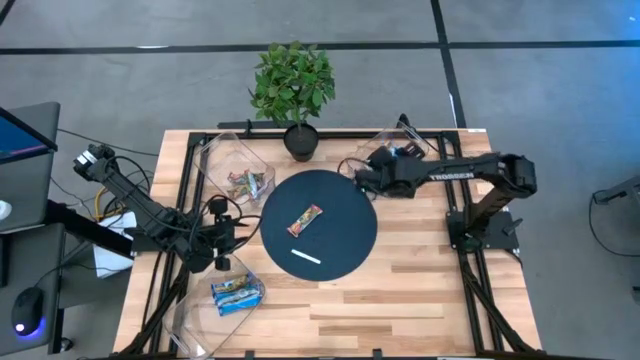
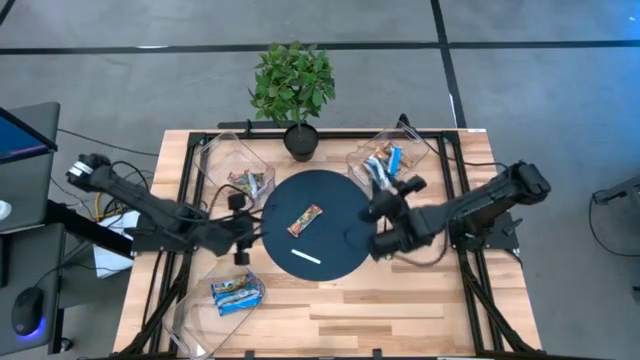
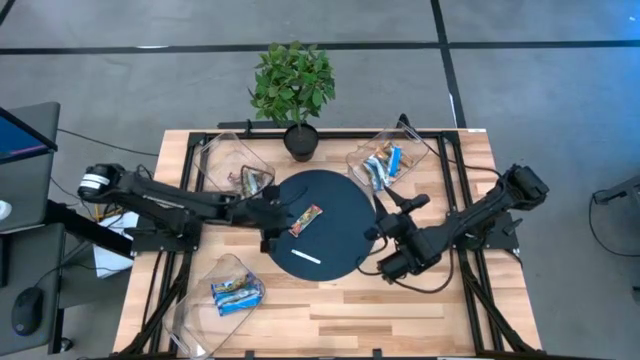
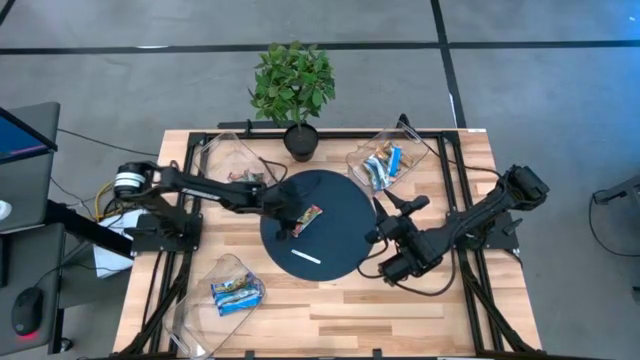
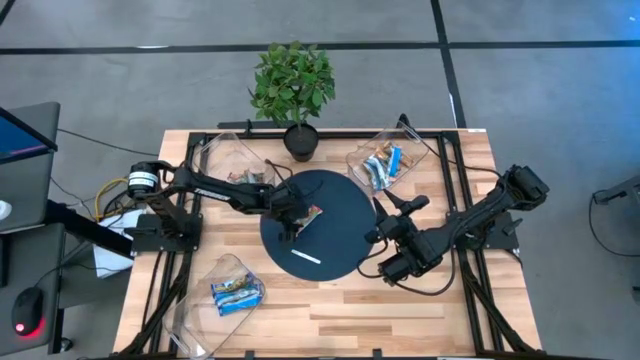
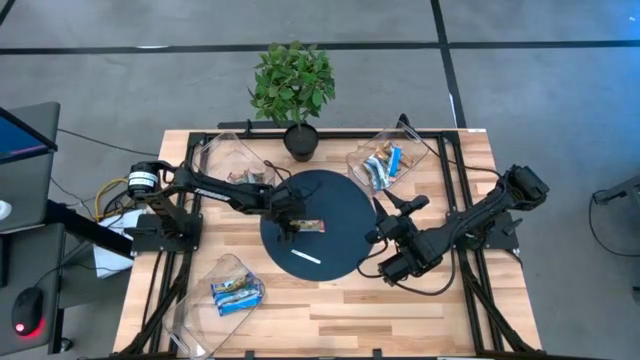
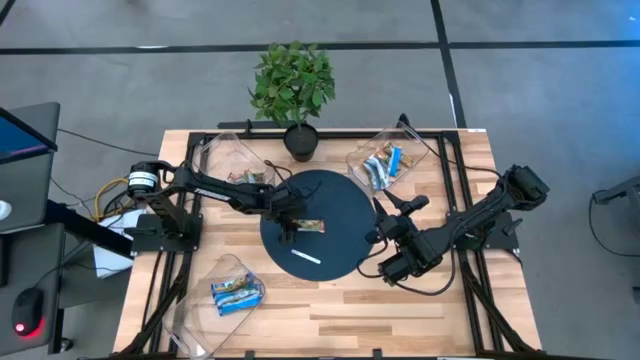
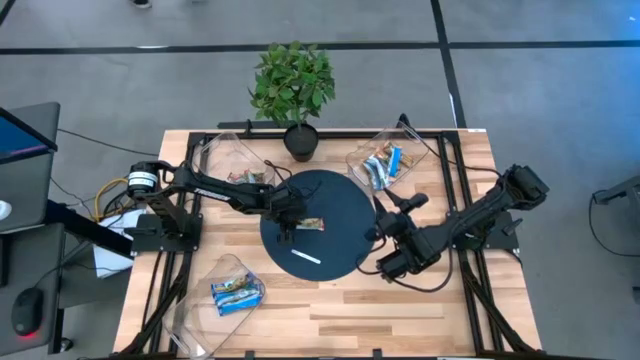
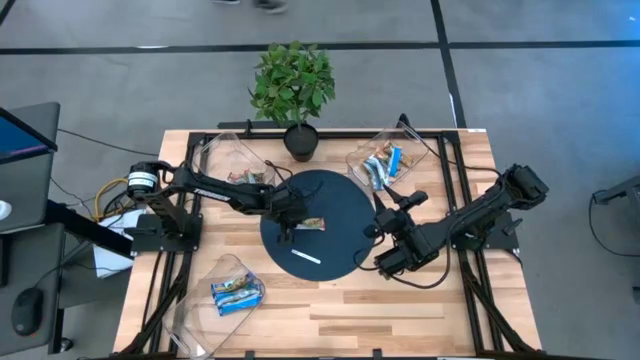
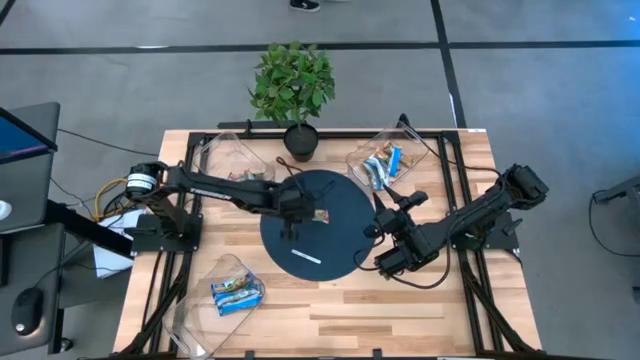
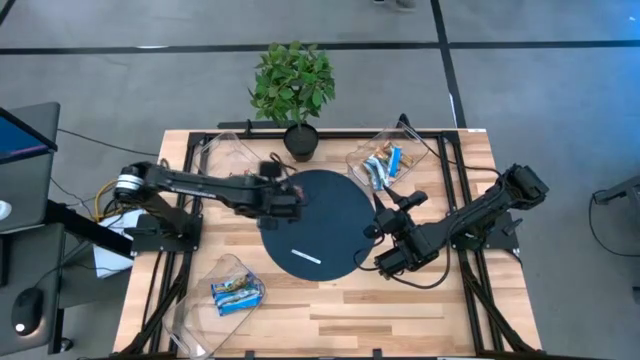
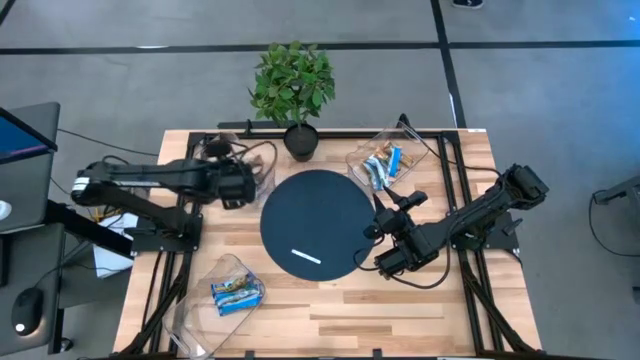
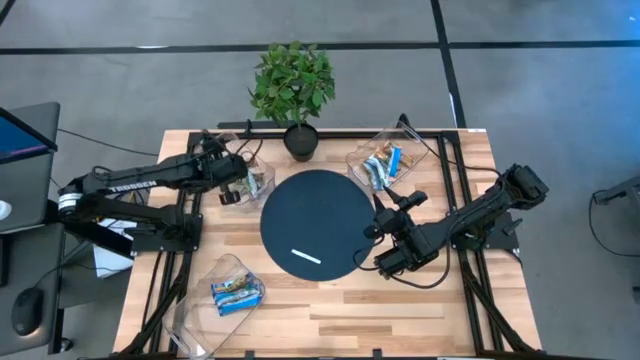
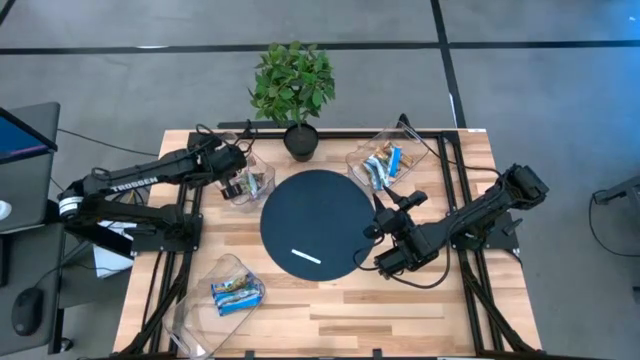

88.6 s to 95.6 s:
Task: Pick and place Granola Bars by type
Put the red granola bar into the top left bin

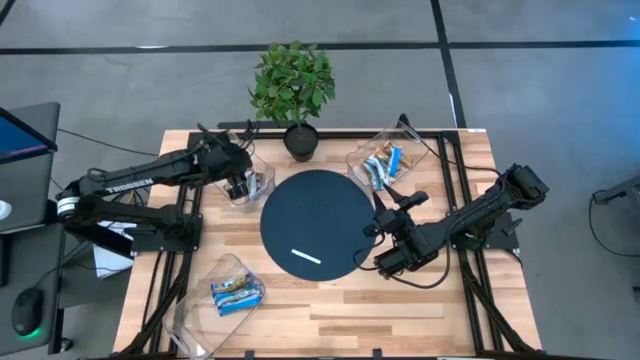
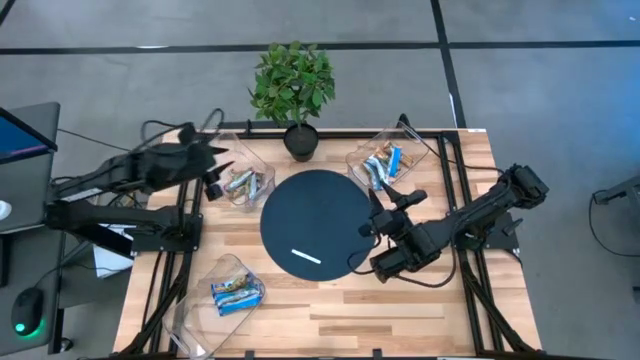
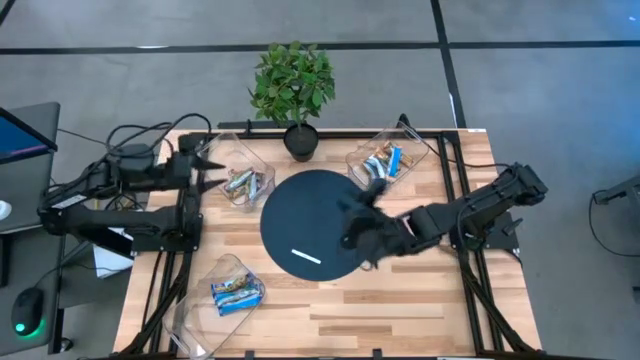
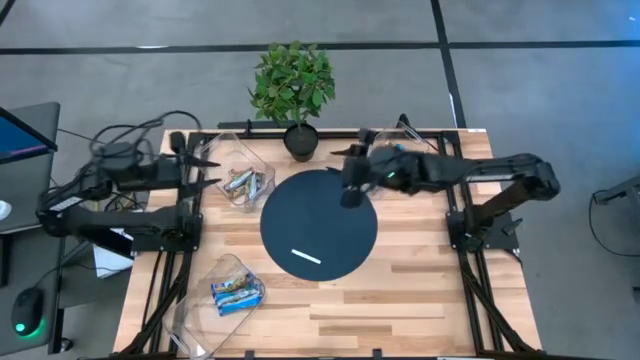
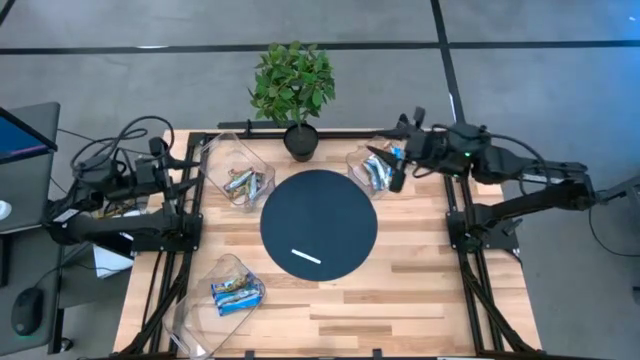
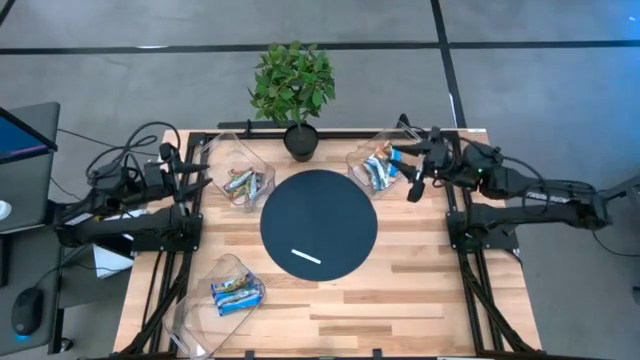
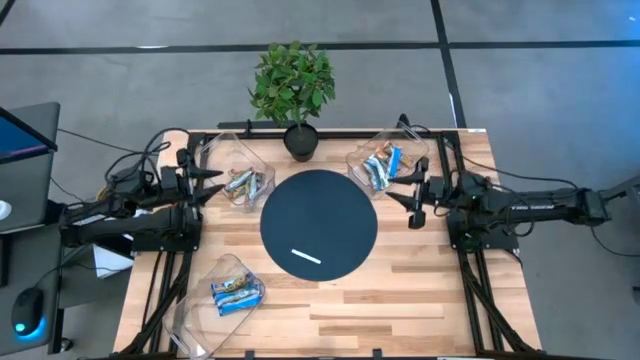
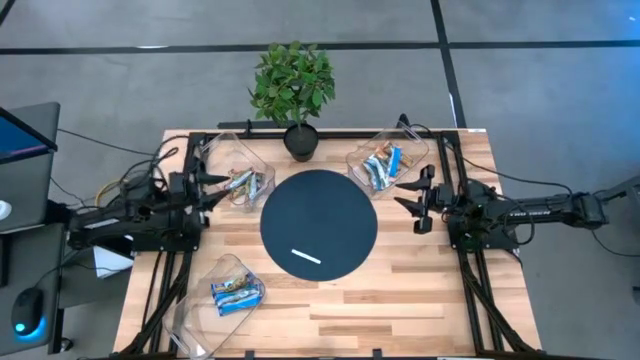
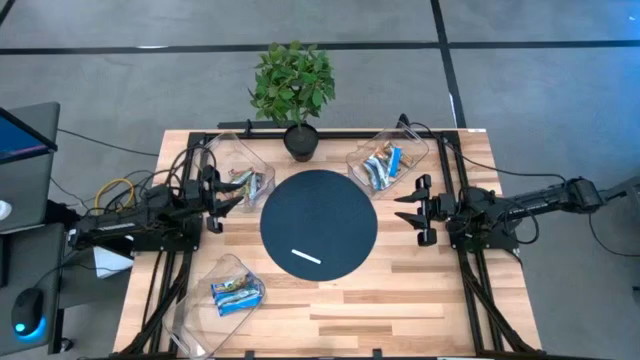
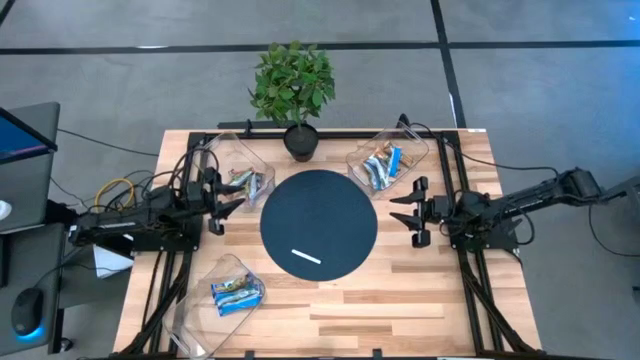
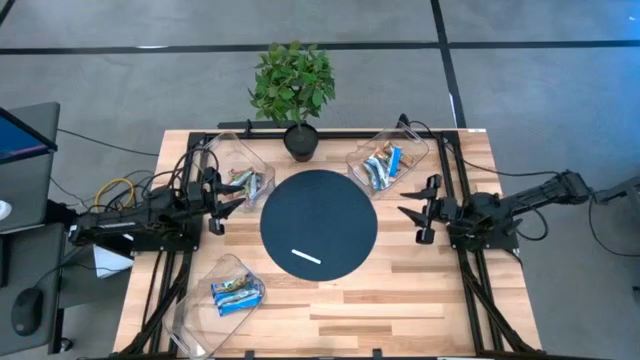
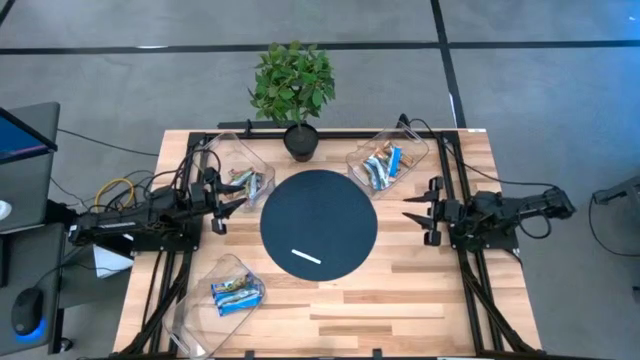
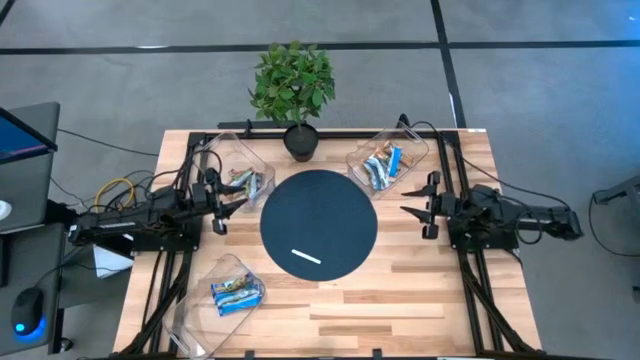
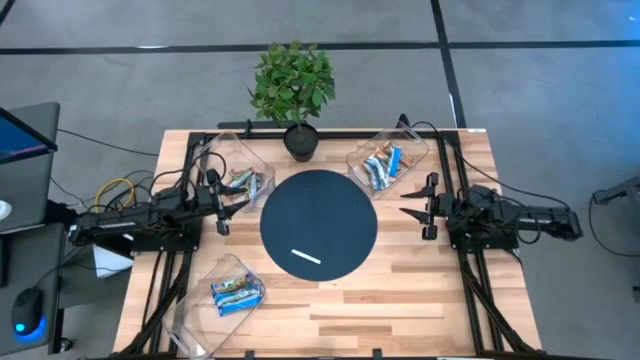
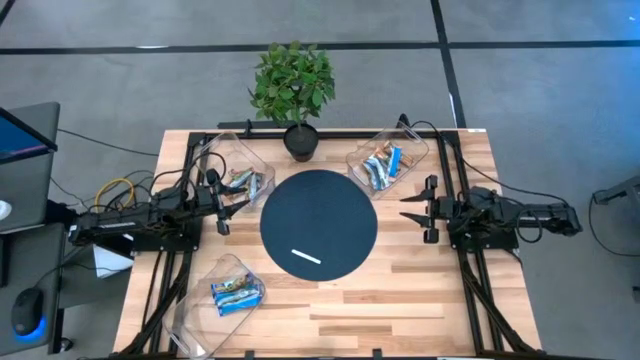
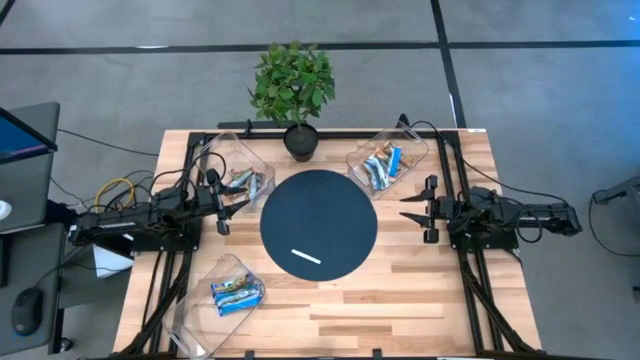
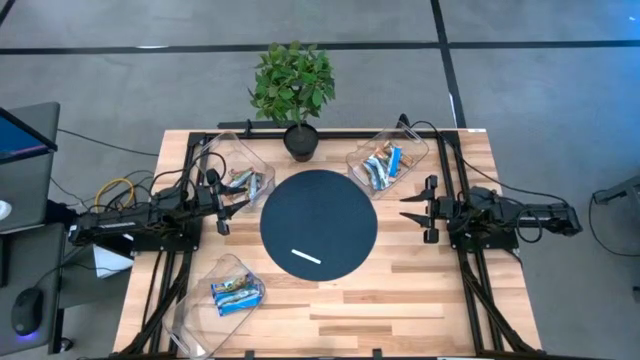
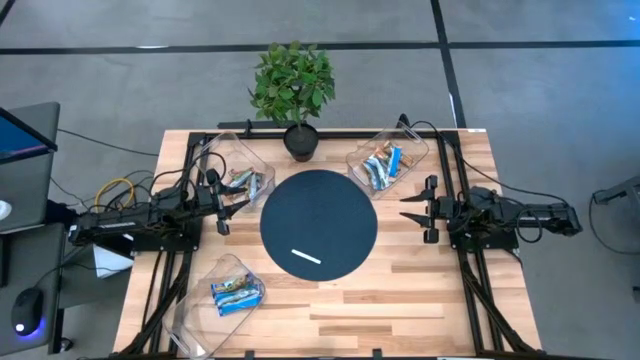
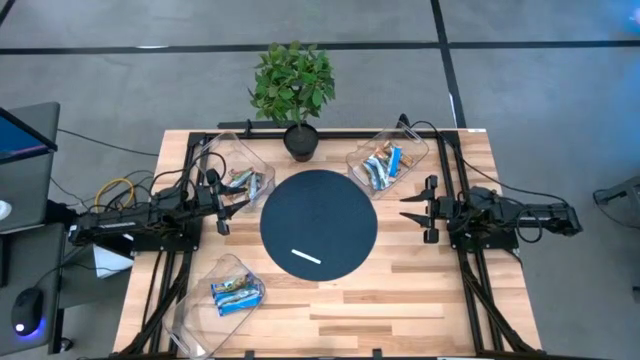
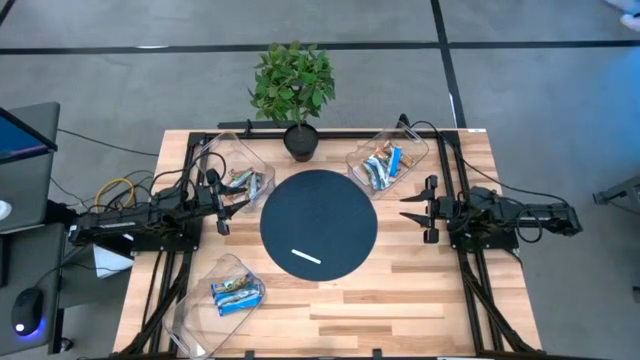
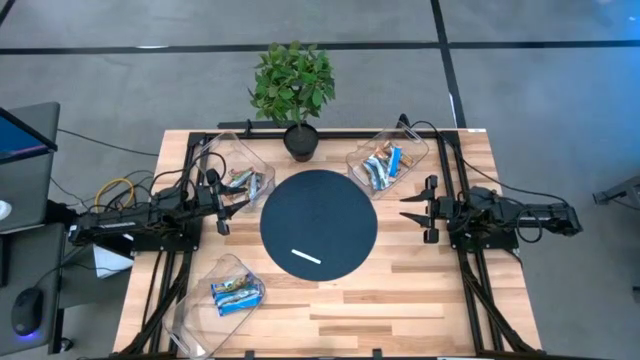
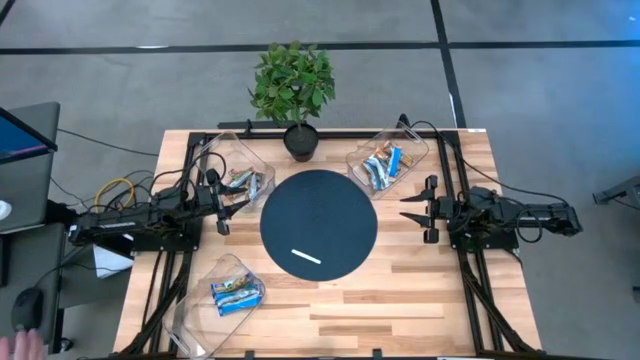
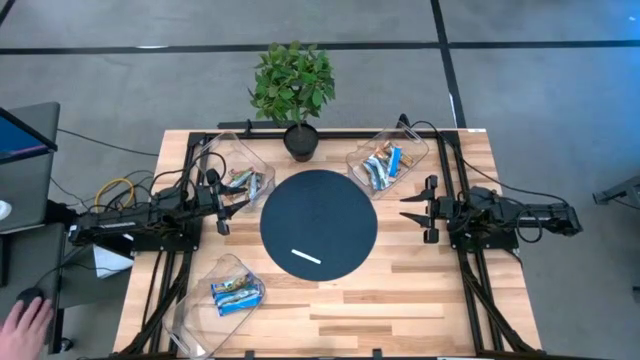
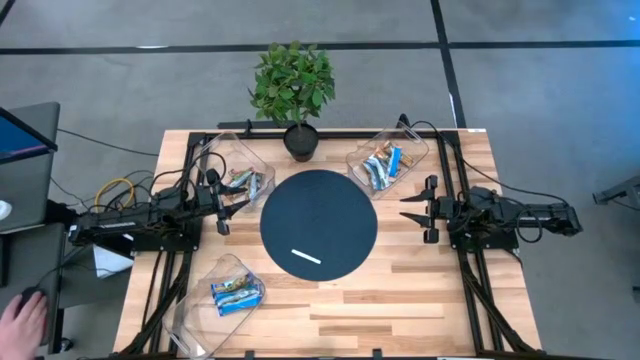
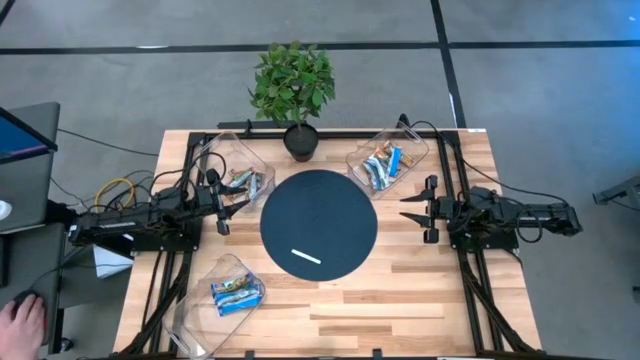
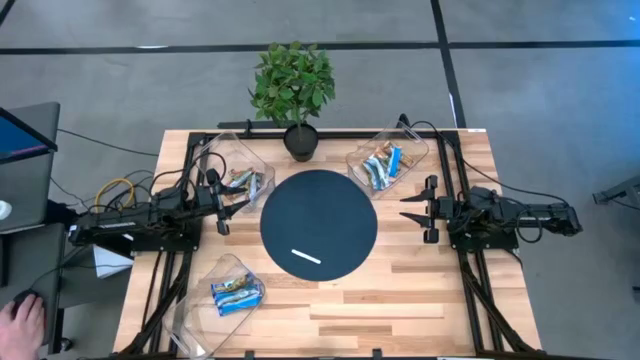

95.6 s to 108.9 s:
Return to Home Position

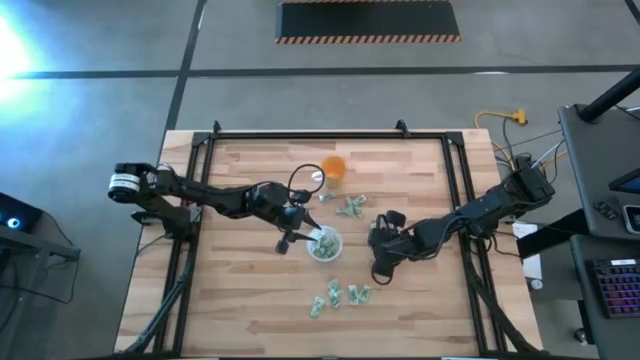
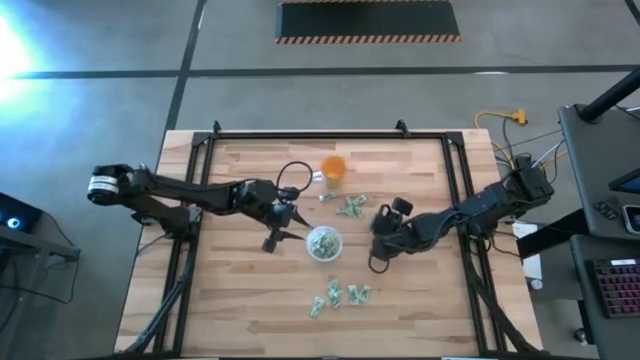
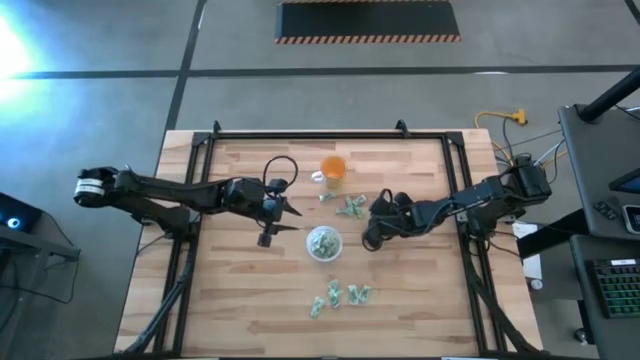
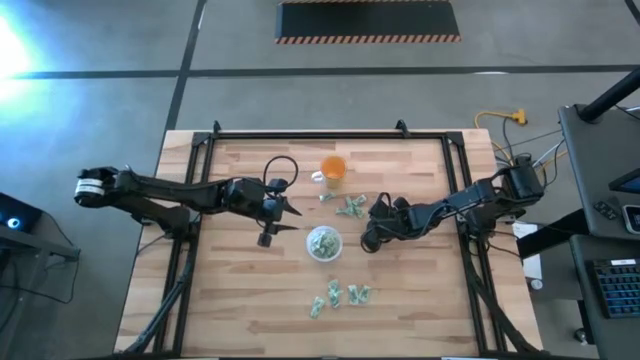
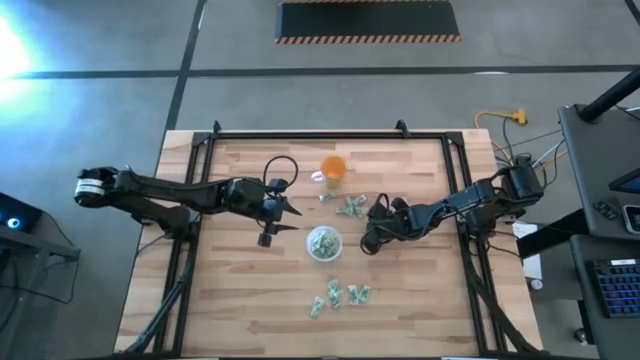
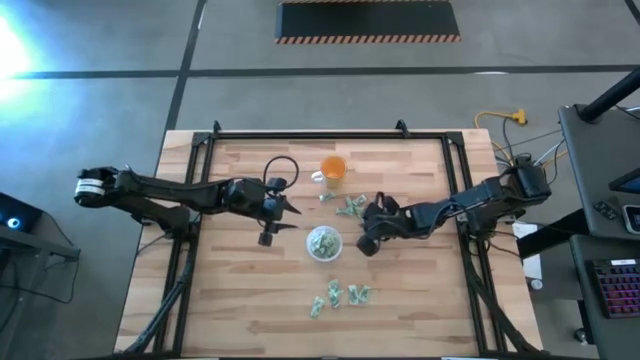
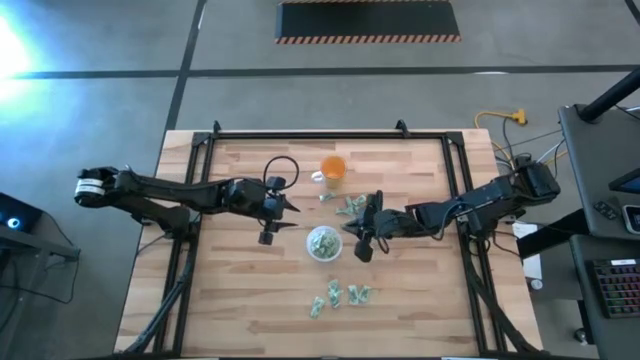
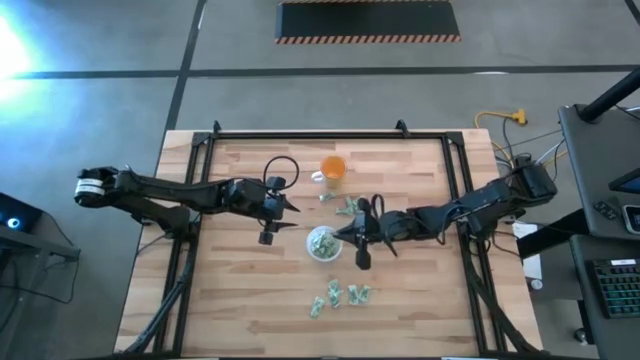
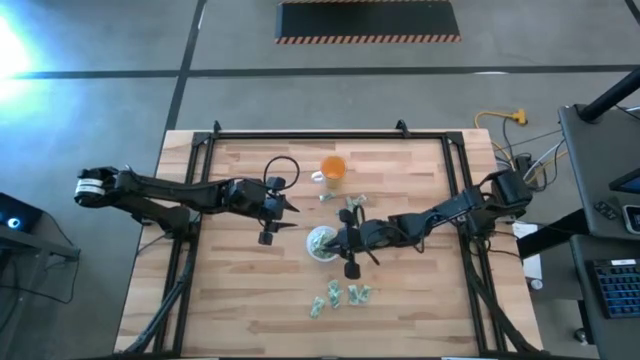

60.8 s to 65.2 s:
Task: Pick and place Stevia / Truvia into bins
Put the green stevia packet into the transparent container
